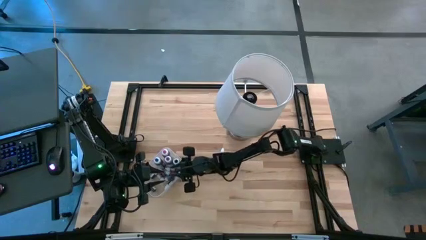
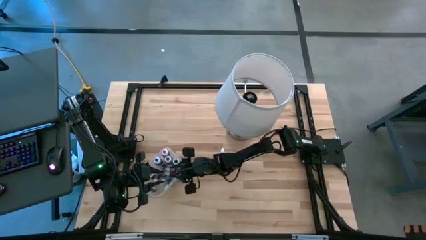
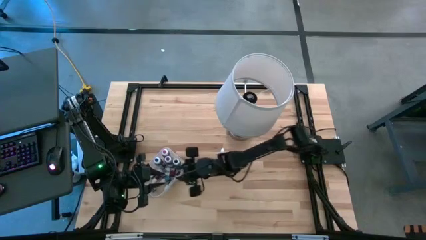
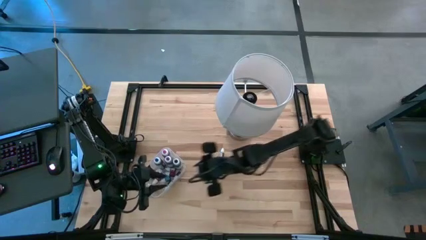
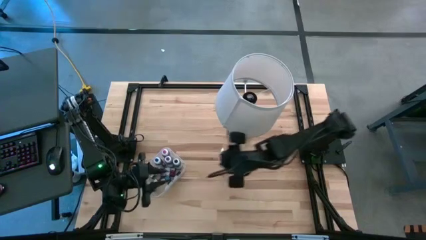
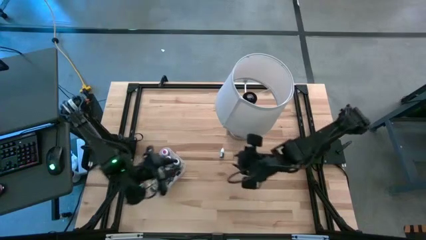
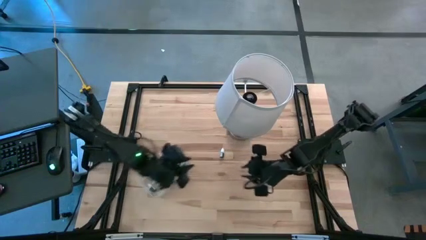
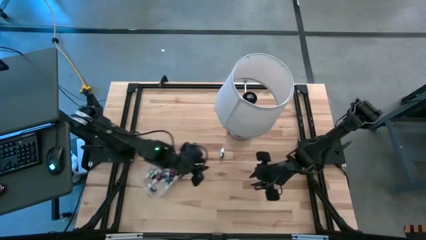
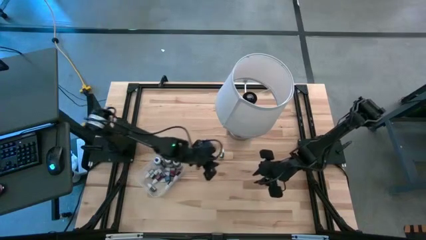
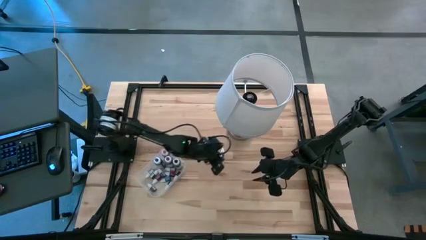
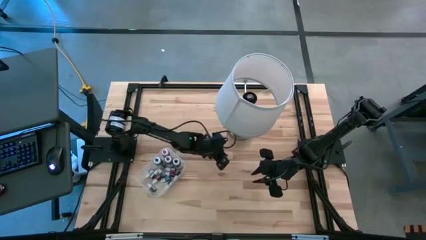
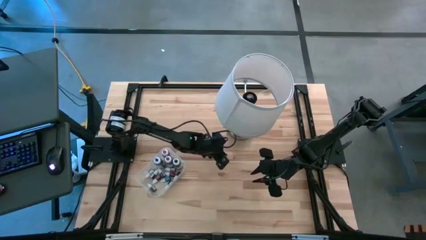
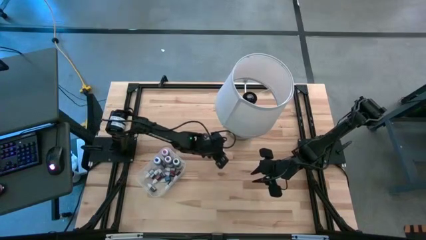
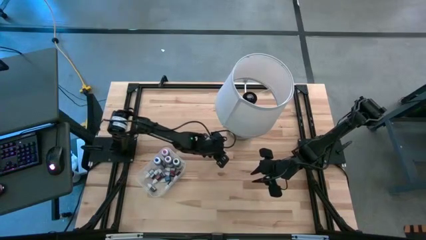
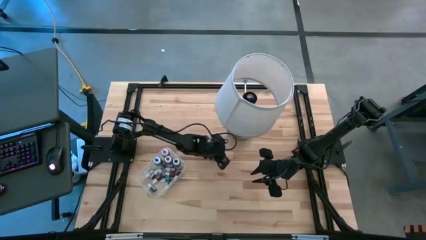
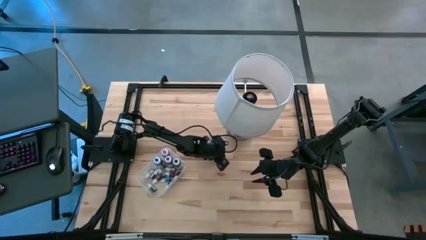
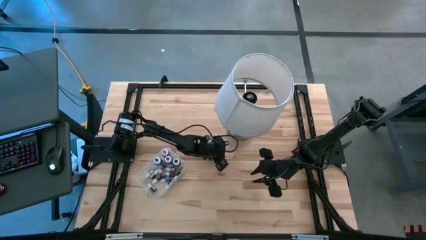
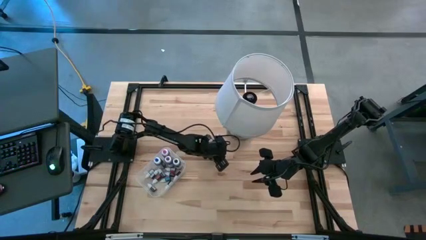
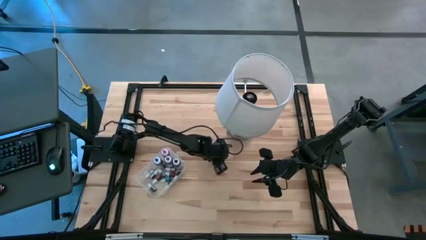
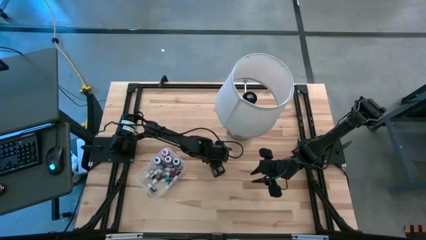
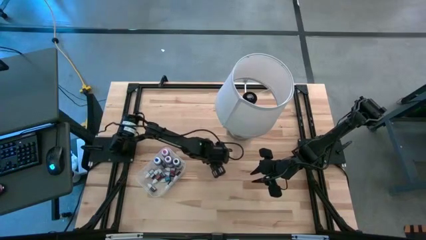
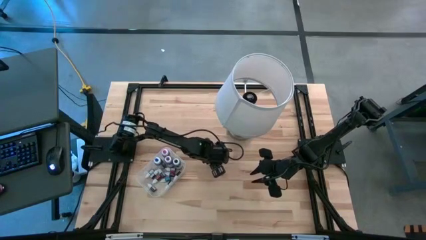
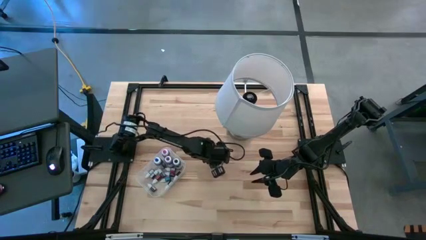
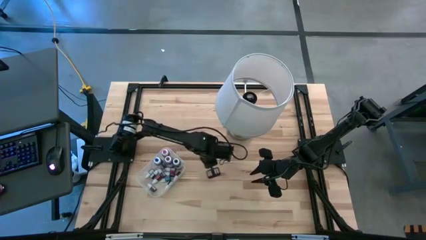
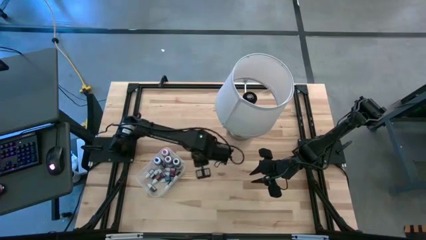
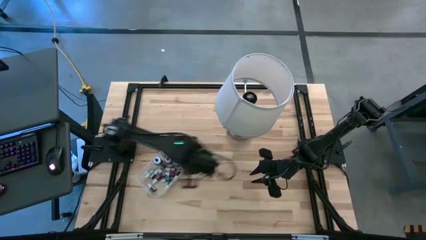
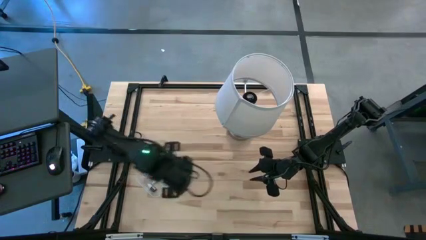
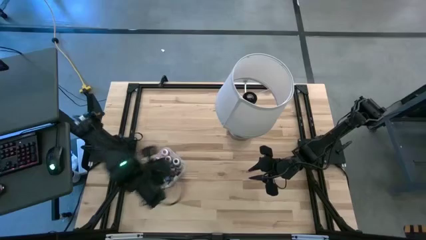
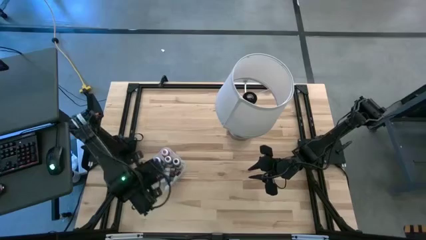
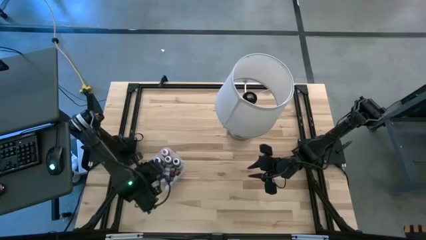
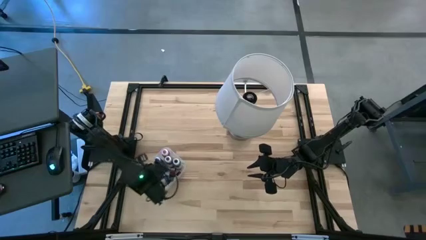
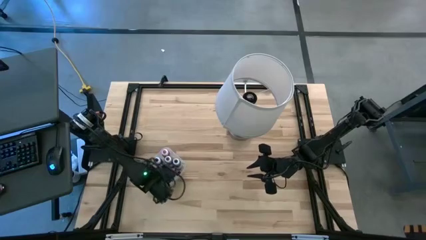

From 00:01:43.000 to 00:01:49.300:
Task: Pick & Place food coloring
Put the green food coloring bottle into the transparent bin

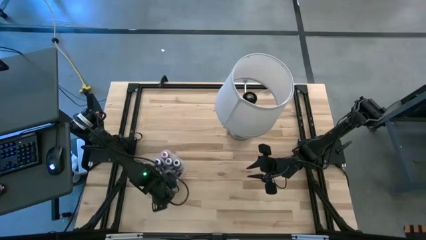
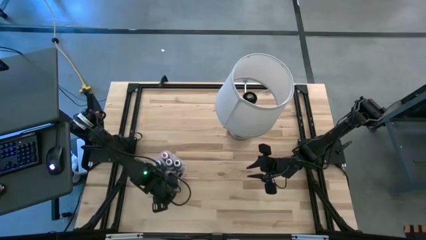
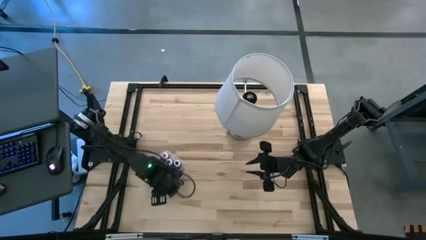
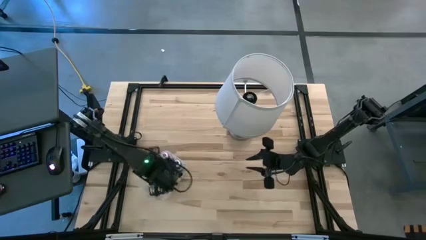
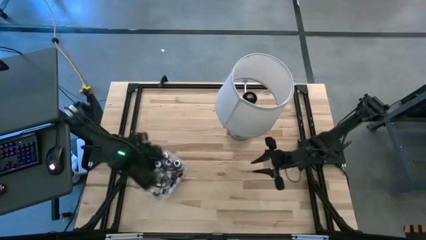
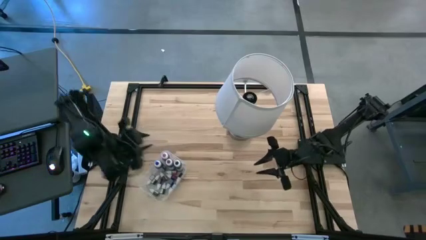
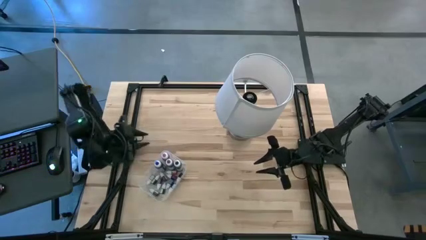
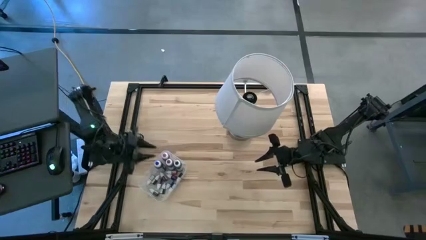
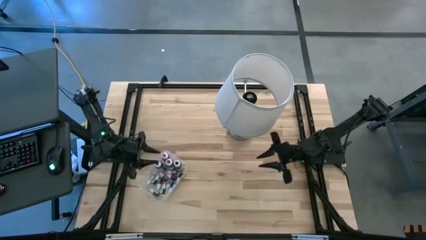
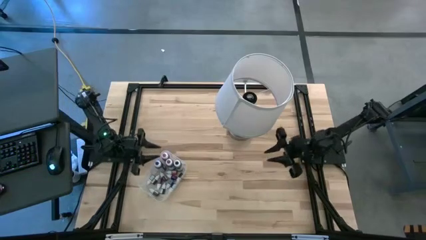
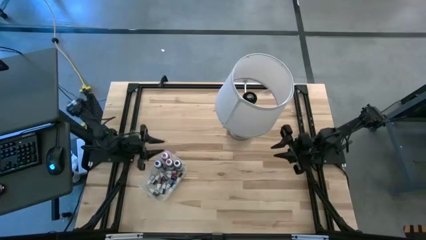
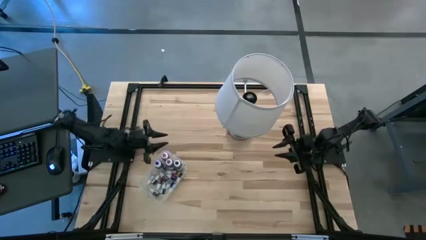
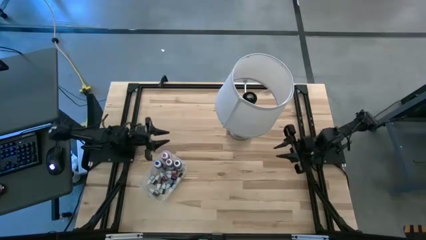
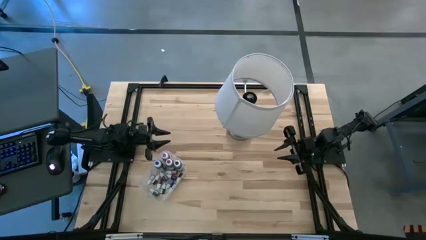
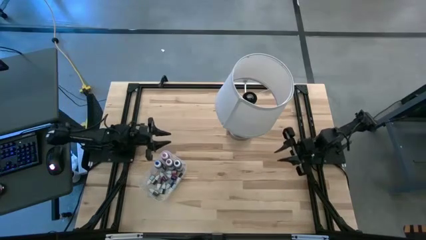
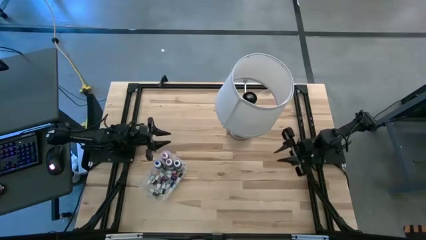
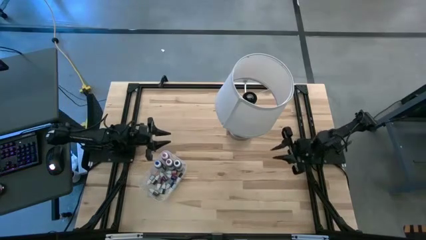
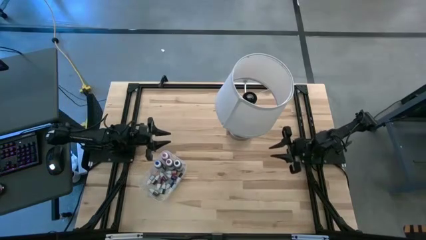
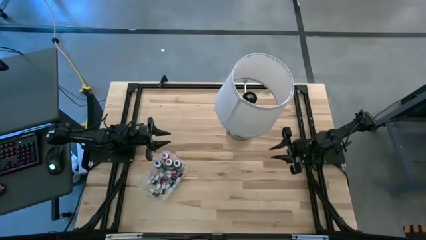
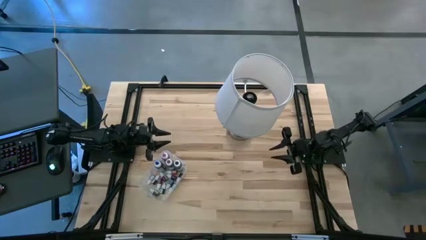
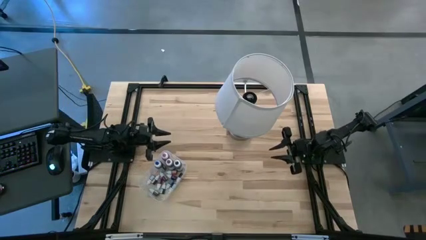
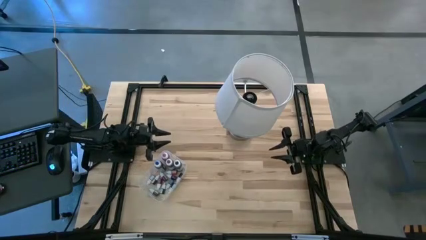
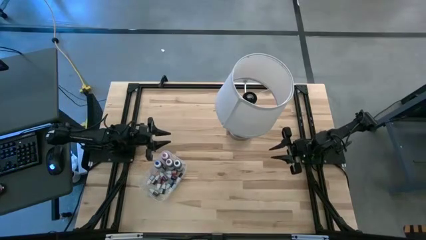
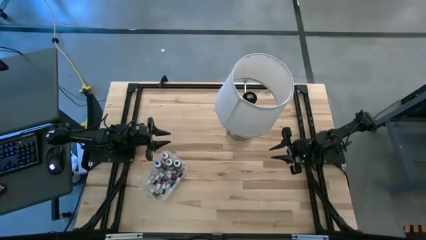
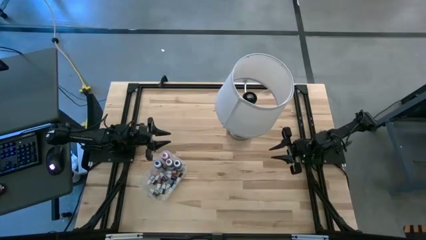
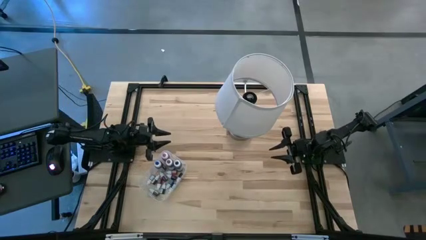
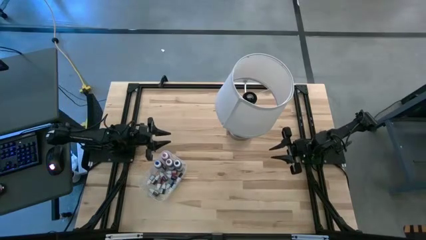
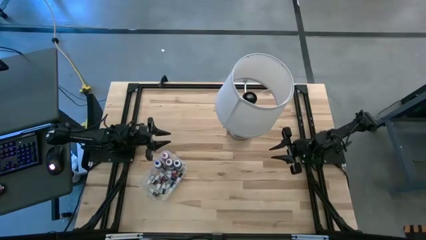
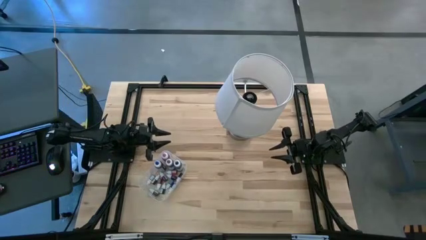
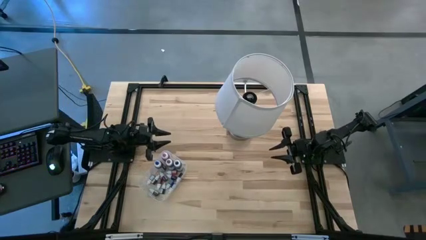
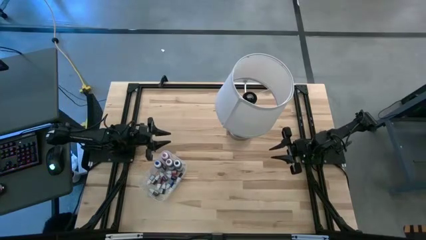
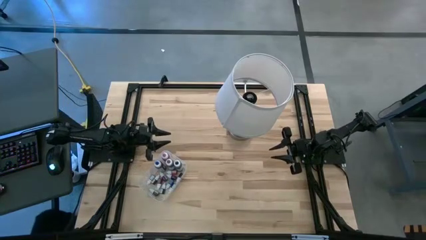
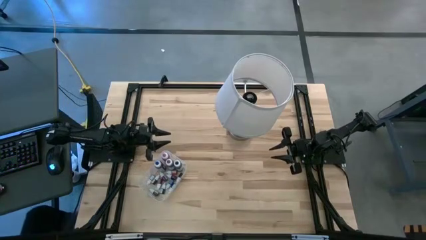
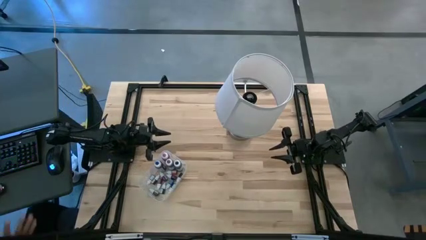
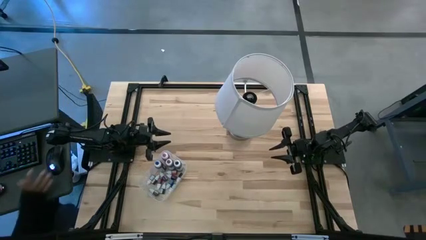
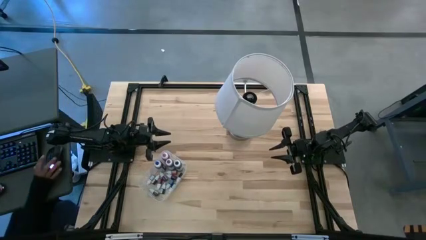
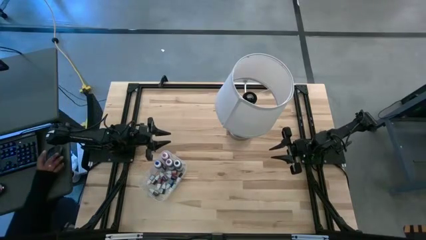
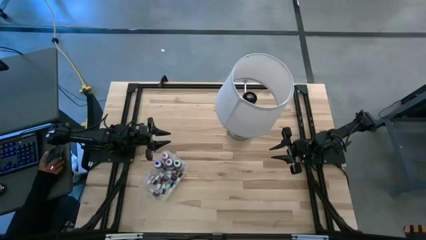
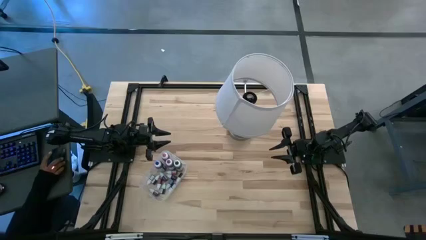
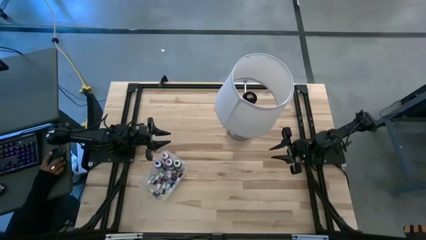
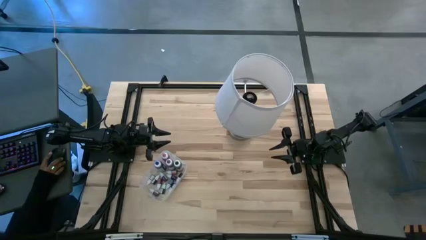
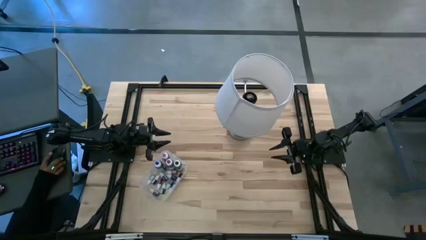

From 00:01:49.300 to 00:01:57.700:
Return to Home Position

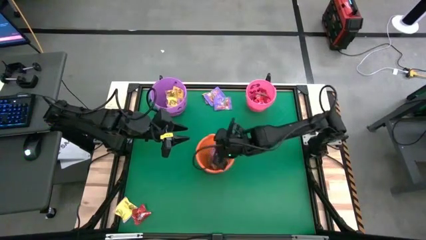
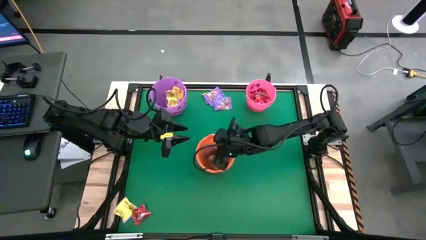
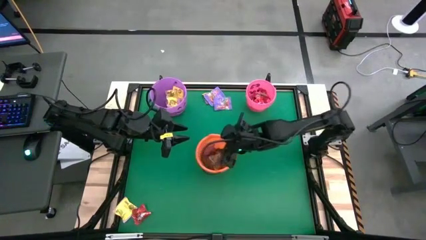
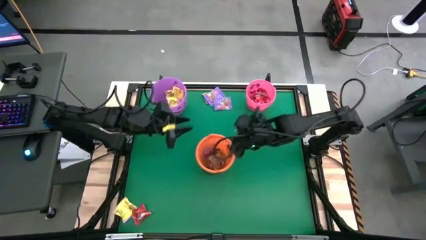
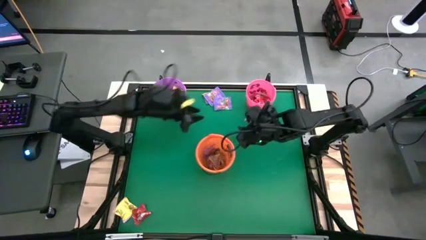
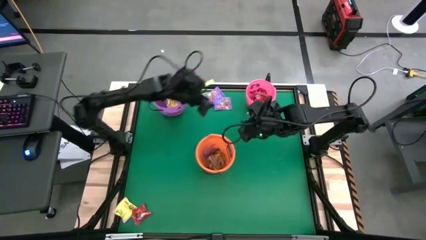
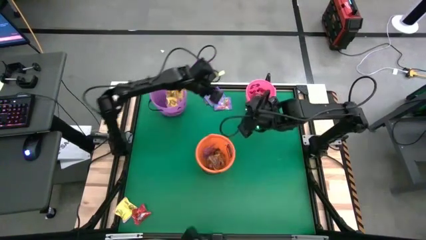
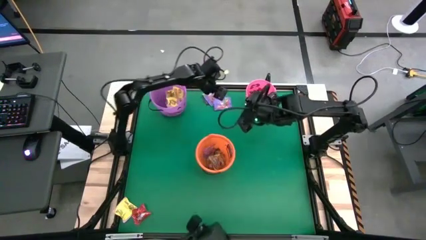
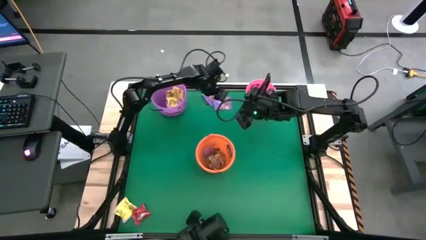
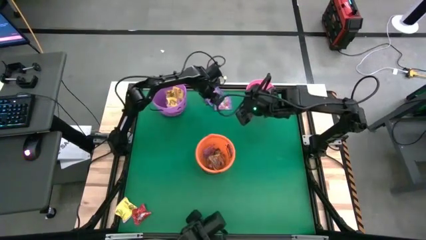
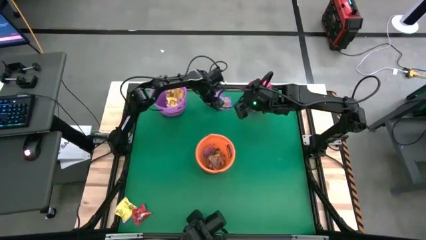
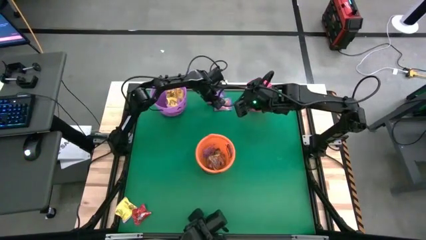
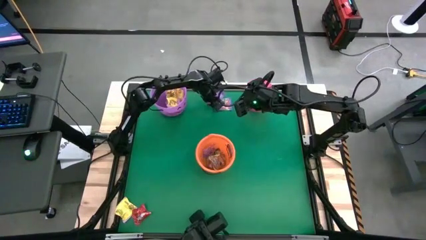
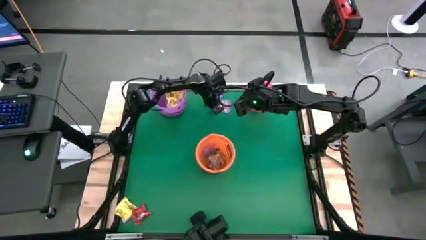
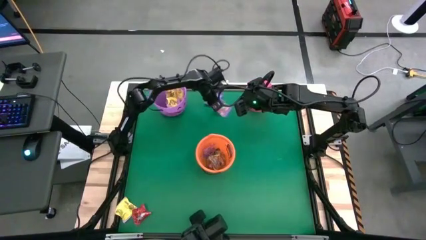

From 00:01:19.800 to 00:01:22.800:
Task: Sort candy by brand, put in halloween buckets
Put the violet candy into the orange bucket
